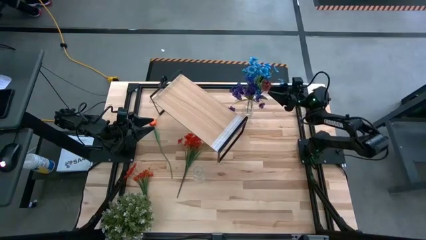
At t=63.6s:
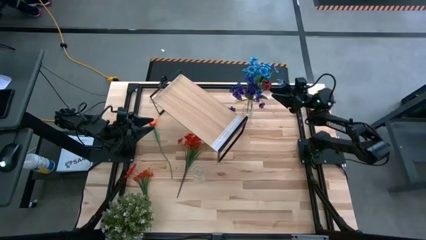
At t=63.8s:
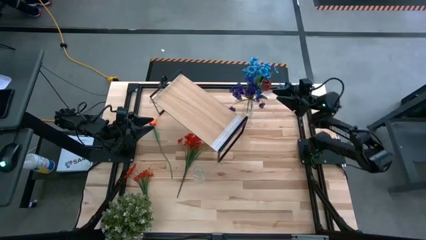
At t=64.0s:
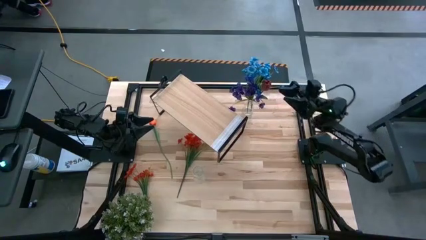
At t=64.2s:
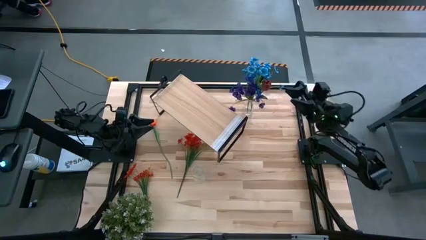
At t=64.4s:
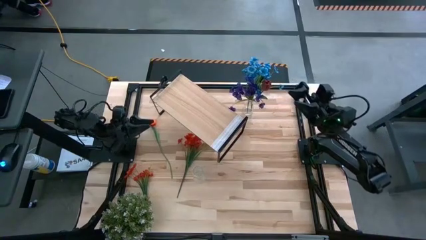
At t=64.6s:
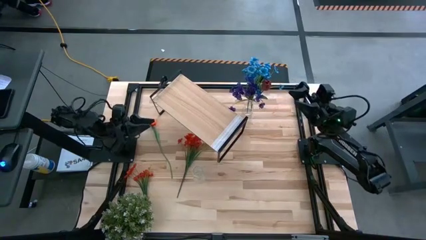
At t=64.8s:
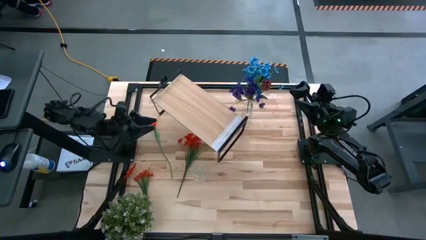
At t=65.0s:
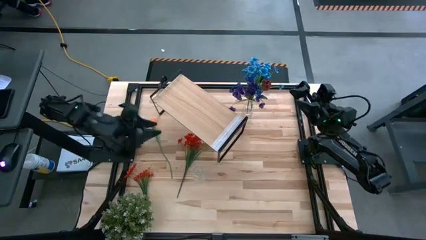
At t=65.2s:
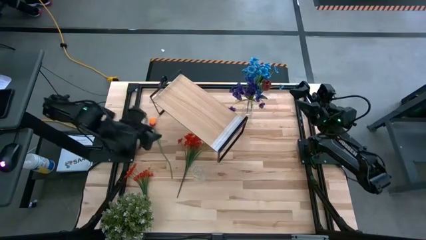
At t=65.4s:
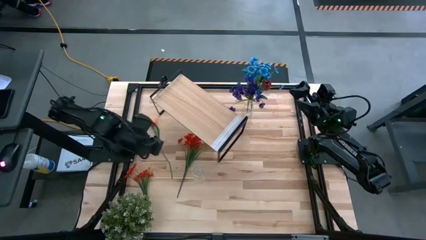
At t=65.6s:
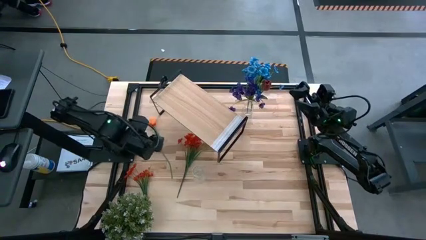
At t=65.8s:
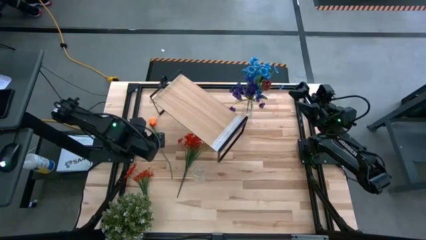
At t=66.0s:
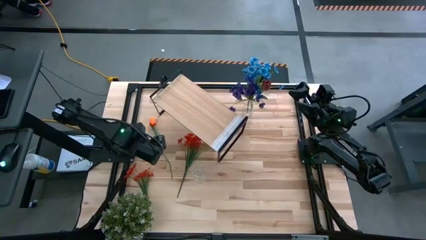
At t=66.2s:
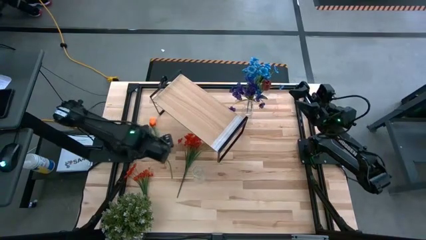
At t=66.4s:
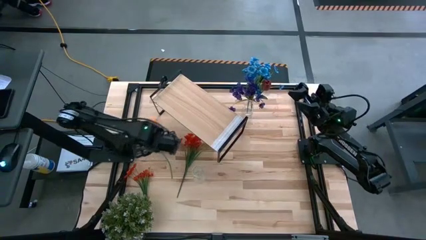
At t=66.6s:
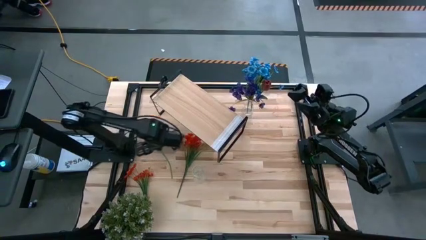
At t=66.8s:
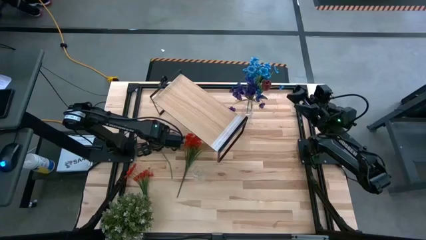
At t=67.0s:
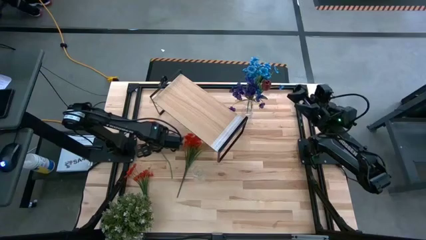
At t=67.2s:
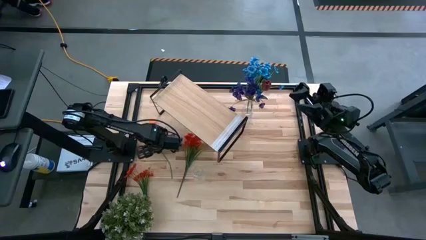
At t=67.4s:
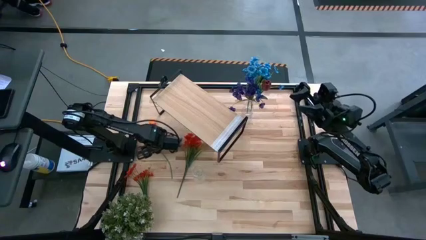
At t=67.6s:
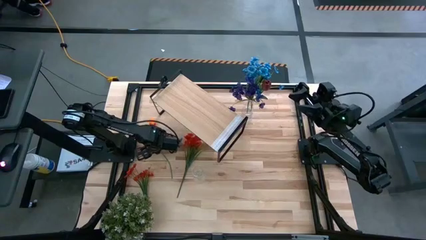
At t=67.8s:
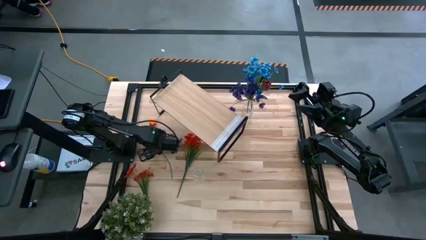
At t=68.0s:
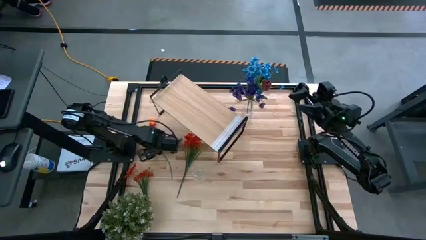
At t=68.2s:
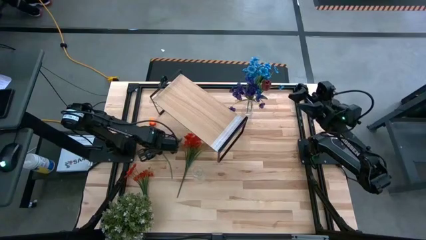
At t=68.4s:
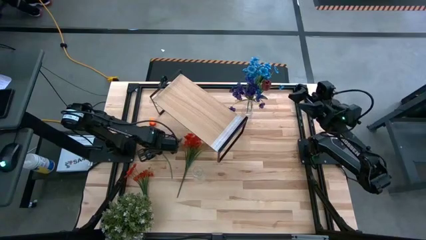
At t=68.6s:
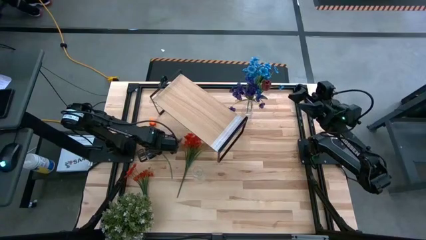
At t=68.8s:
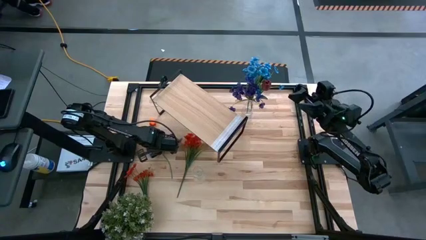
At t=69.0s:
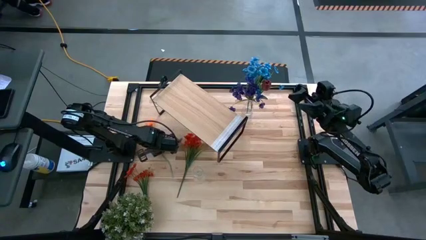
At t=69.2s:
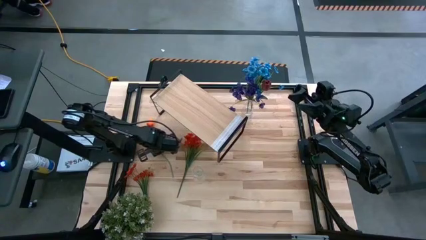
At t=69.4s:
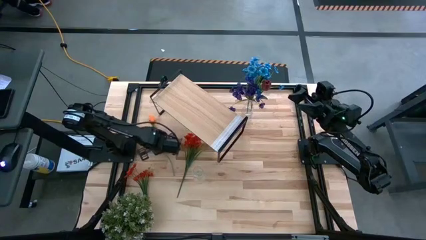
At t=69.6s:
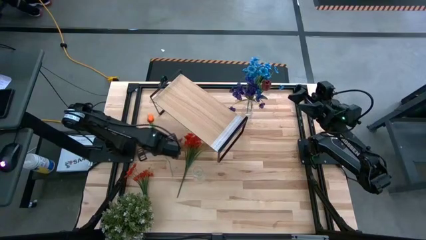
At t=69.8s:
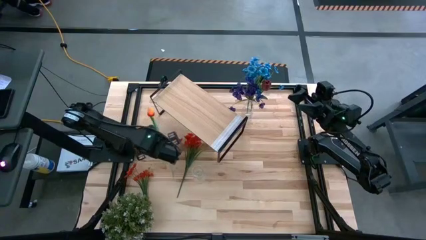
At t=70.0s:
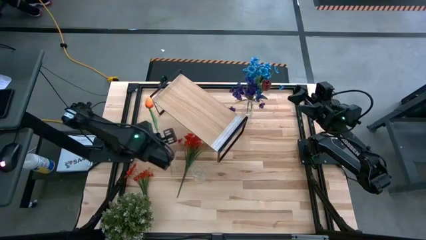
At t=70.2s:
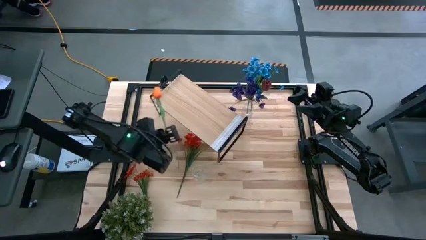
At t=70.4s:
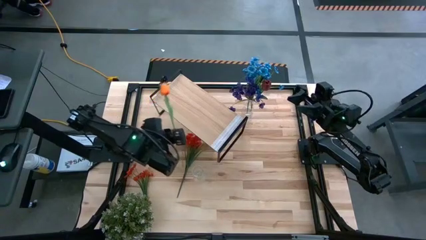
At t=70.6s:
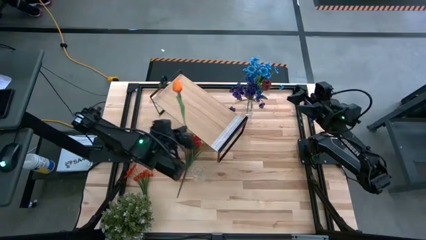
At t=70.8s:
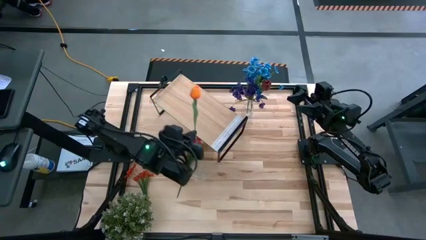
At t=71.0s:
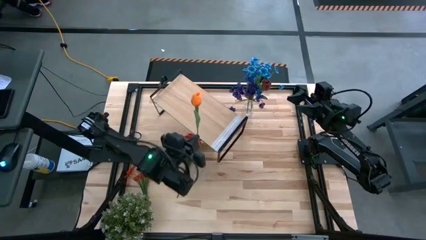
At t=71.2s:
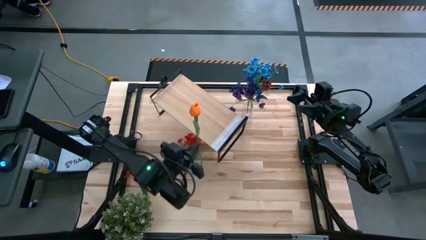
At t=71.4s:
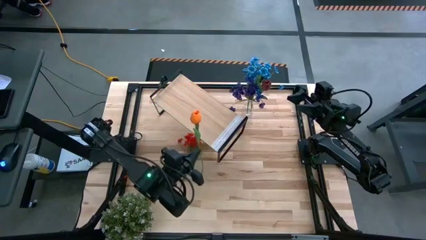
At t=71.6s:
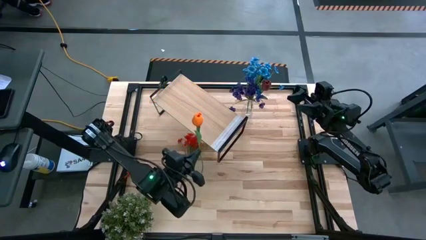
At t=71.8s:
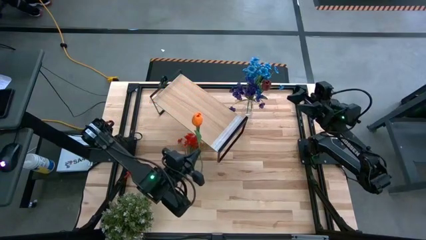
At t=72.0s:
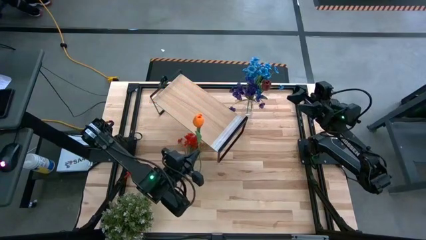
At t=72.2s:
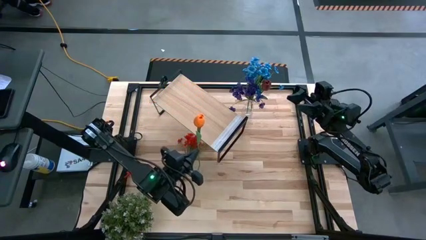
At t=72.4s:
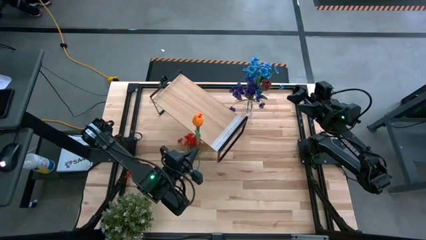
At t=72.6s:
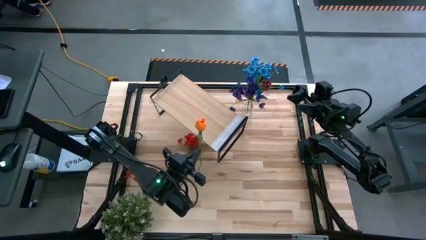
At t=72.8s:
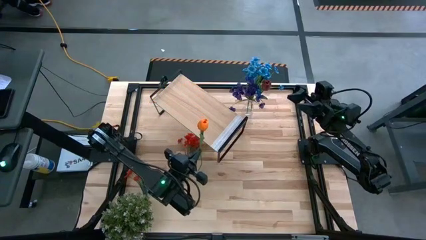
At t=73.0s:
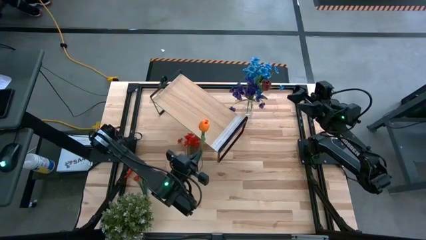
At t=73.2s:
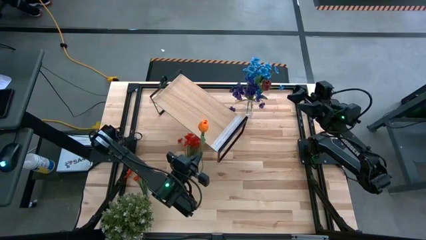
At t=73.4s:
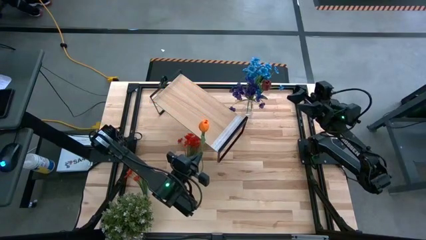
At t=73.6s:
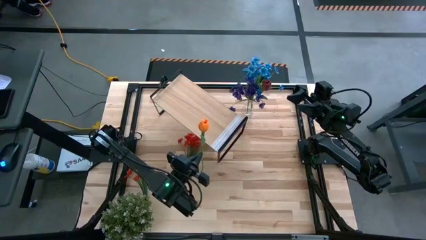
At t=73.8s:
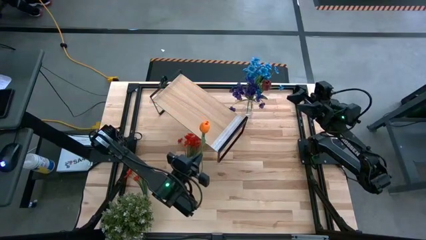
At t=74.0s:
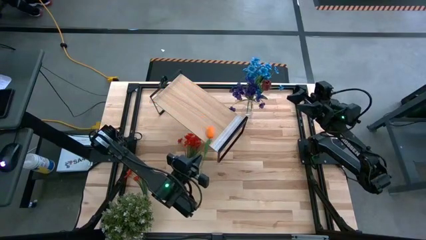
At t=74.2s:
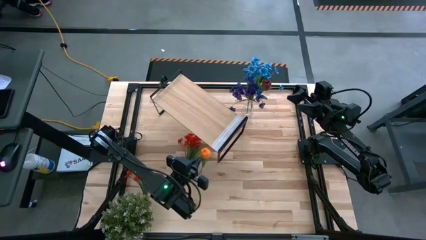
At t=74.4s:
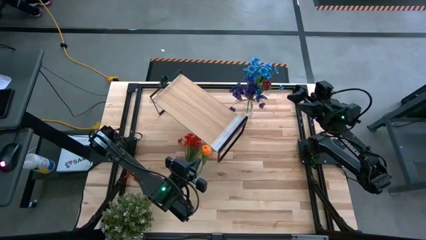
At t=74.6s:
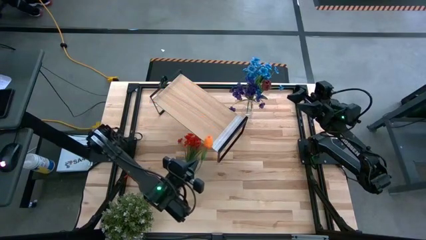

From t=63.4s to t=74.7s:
Task: Pick and place flowers into a vace then onto a shelf
Put the orange flower into the bottom transparent flower vase
